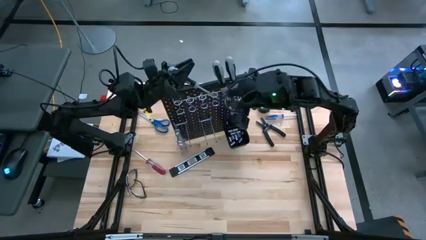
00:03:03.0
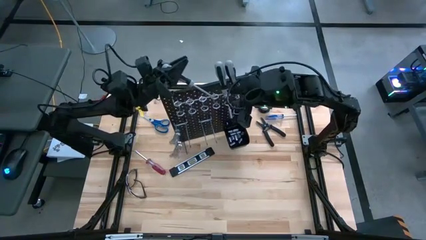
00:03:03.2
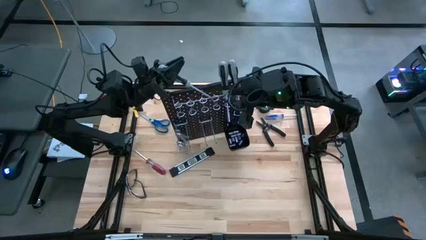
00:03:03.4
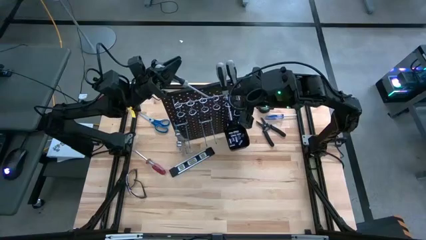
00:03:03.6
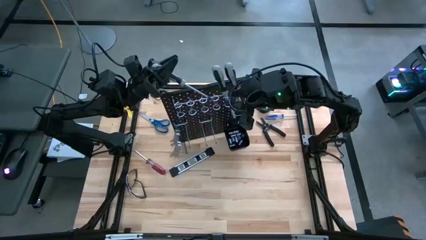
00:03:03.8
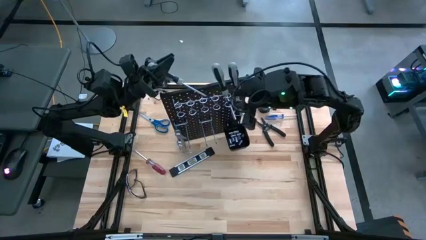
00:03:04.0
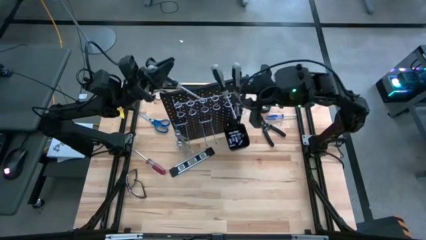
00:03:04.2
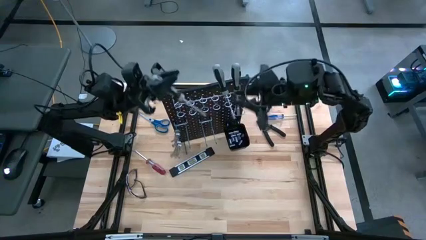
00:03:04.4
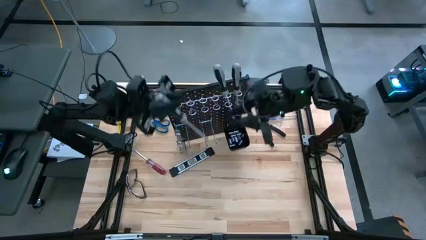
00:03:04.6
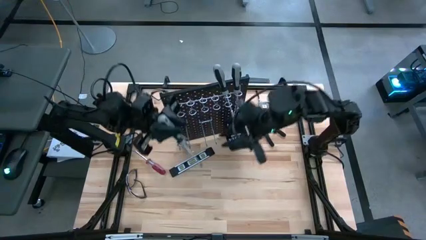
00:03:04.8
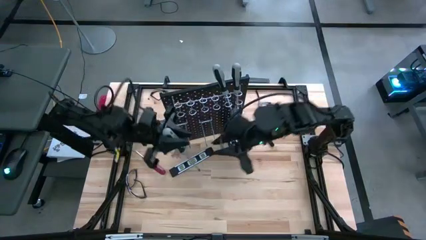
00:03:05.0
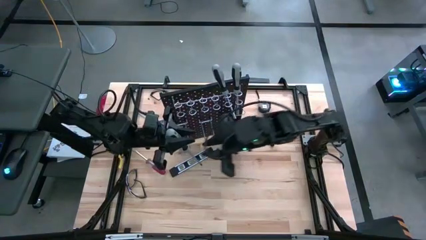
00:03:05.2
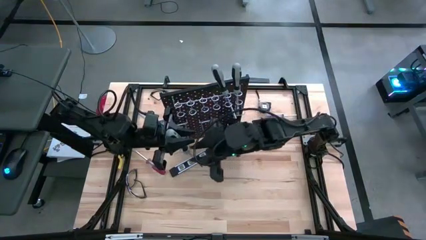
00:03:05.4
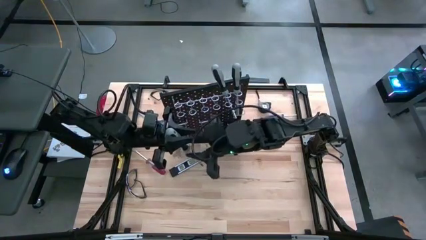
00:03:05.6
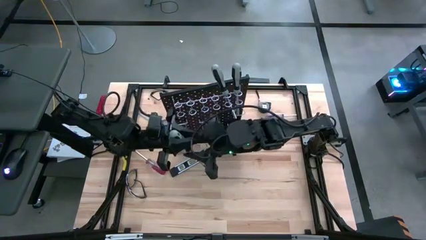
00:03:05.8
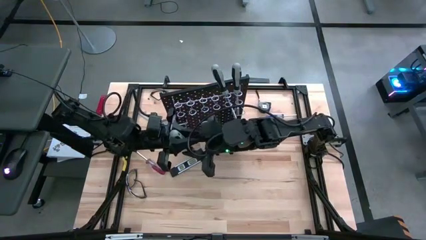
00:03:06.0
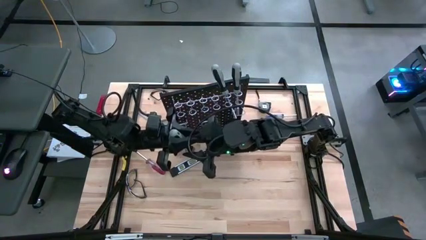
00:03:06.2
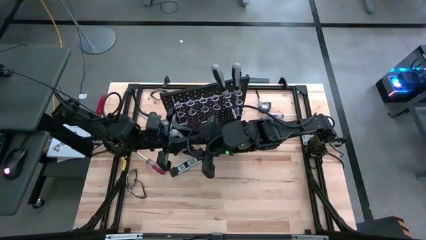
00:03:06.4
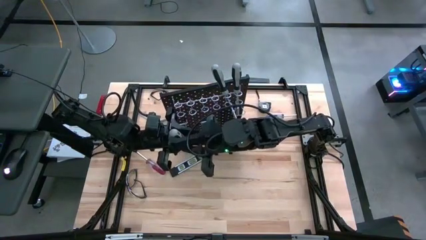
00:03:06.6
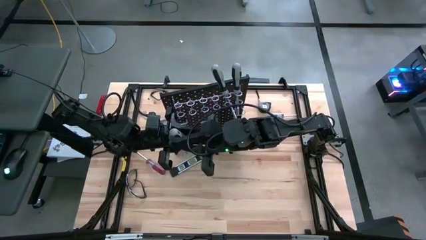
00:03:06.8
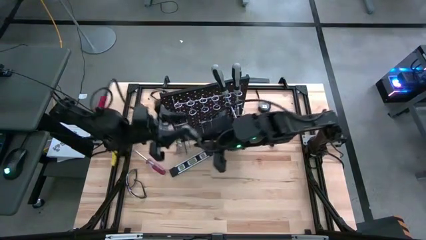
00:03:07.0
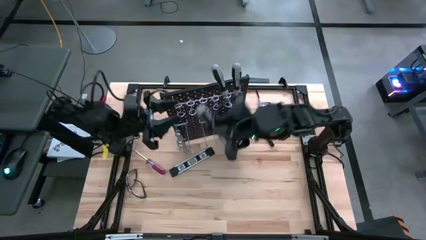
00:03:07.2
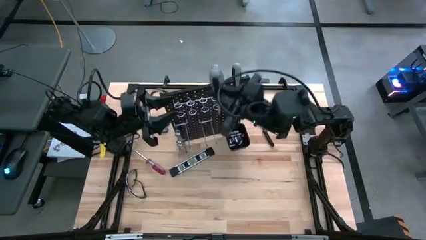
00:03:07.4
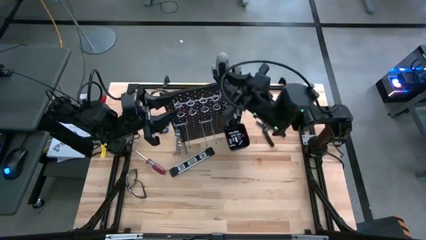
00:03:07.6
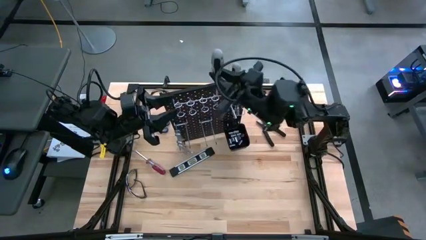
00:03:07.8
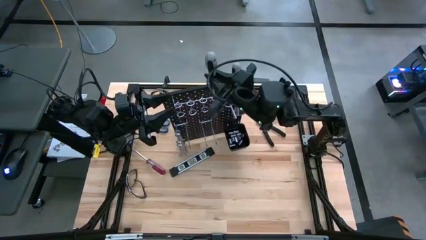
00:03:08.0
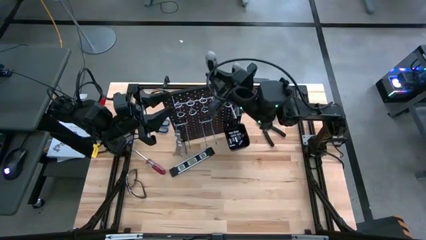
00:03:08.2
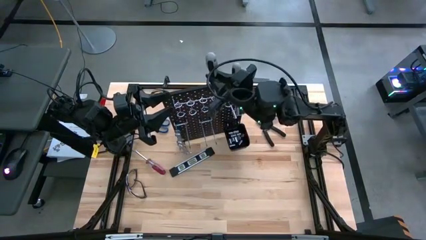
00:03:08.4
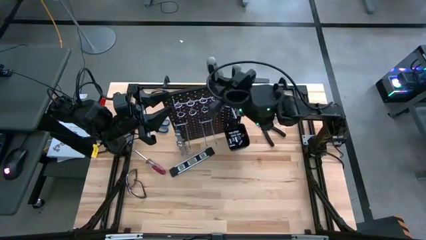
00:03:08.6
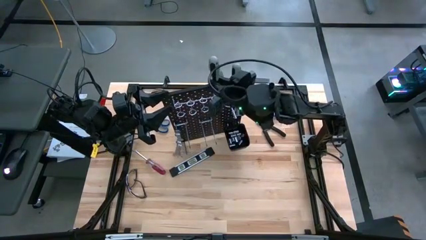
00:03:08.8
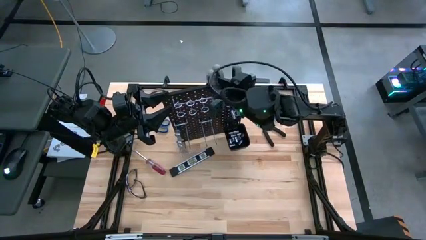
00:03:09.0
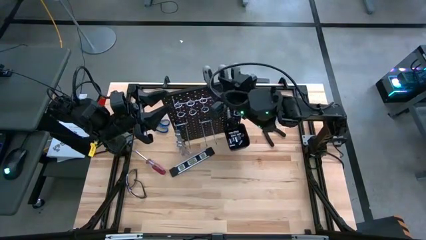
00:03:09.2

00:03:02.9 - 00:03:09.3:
Task: Hang tools onto peg board
Hang the gray screwdriver on the pegboard

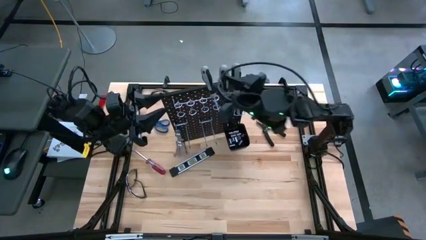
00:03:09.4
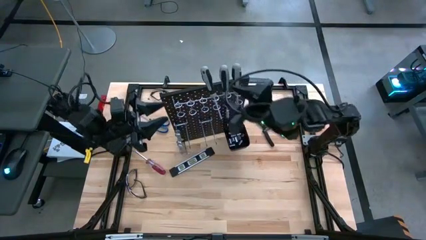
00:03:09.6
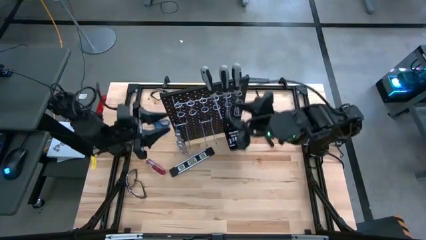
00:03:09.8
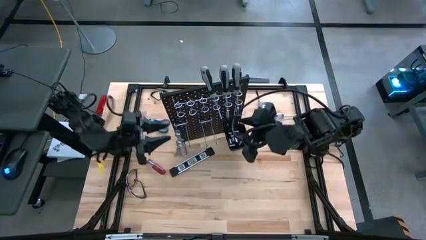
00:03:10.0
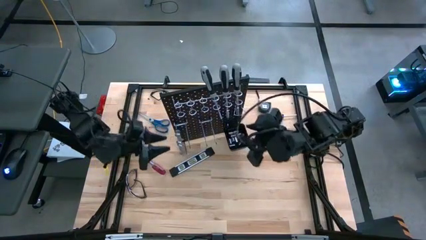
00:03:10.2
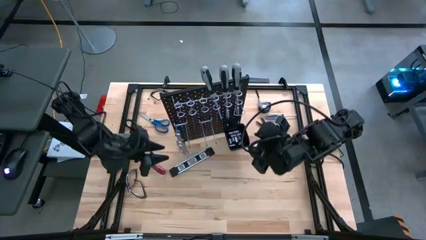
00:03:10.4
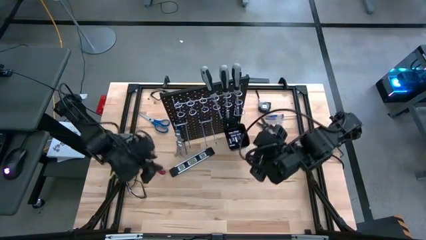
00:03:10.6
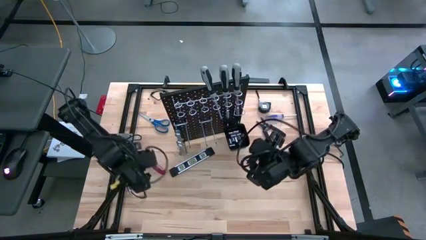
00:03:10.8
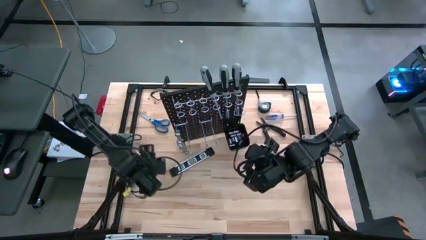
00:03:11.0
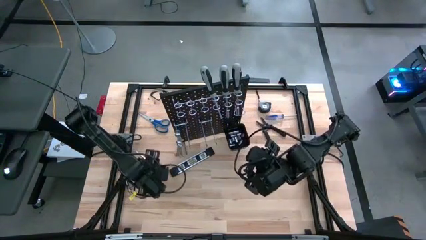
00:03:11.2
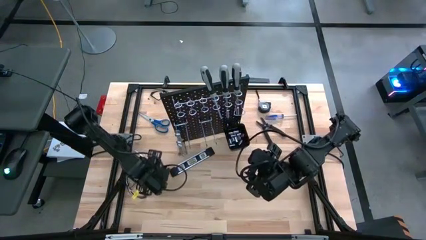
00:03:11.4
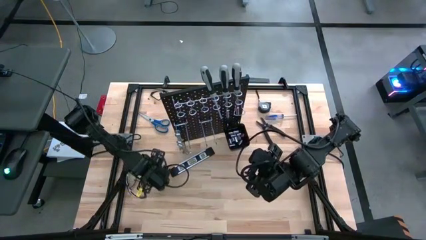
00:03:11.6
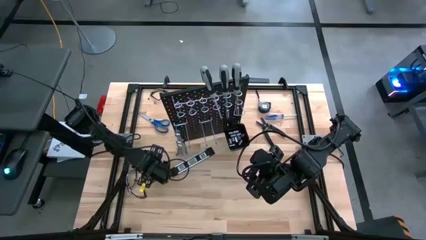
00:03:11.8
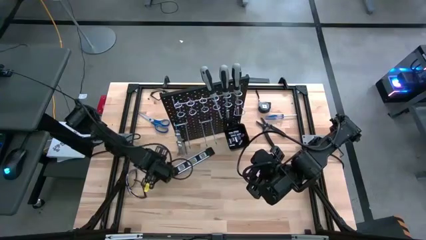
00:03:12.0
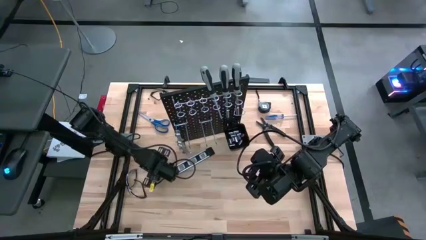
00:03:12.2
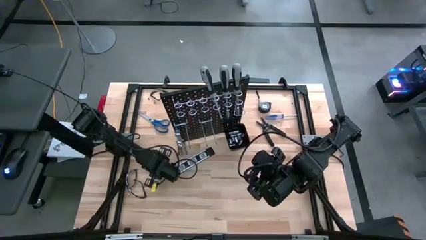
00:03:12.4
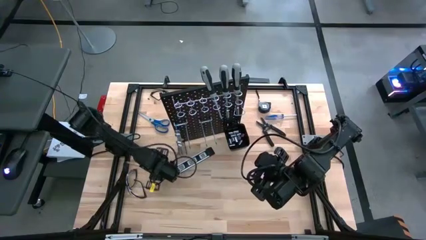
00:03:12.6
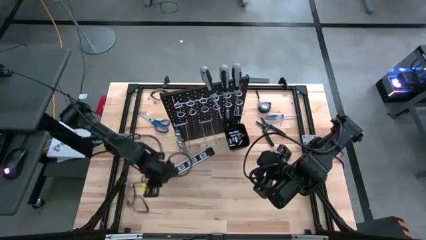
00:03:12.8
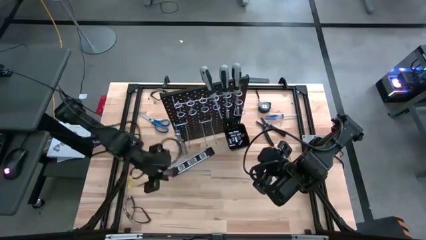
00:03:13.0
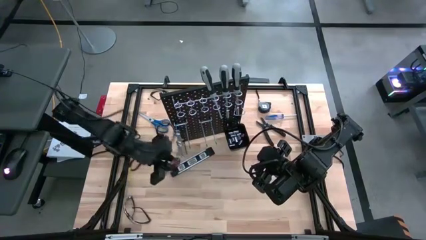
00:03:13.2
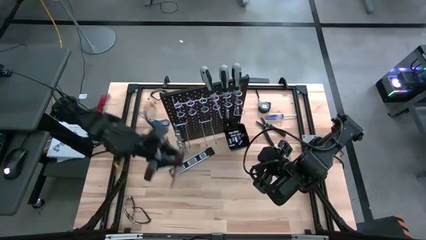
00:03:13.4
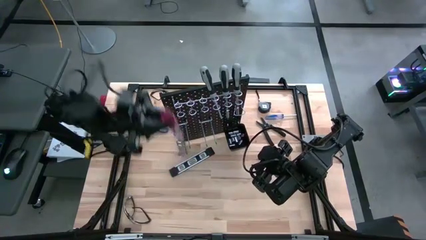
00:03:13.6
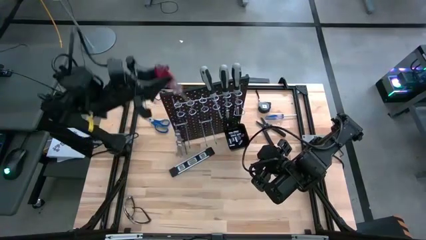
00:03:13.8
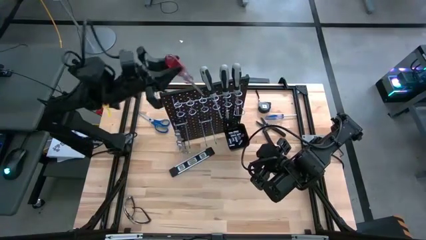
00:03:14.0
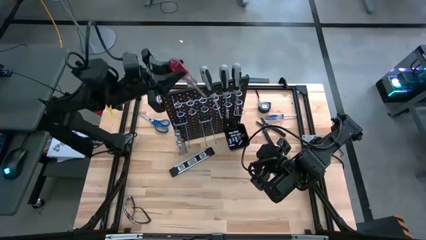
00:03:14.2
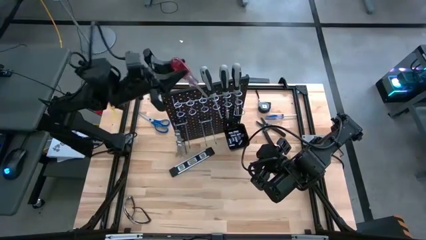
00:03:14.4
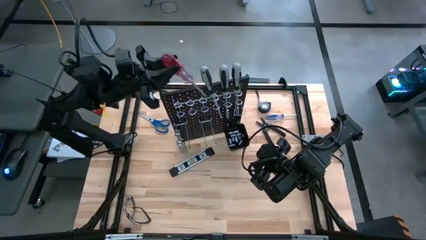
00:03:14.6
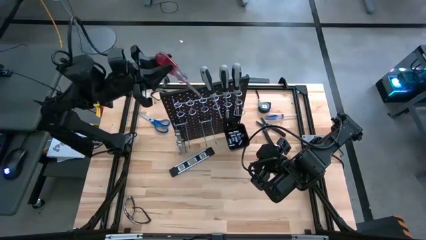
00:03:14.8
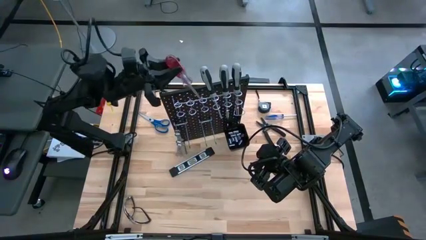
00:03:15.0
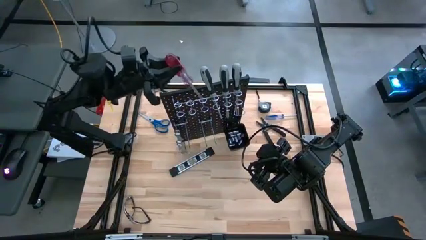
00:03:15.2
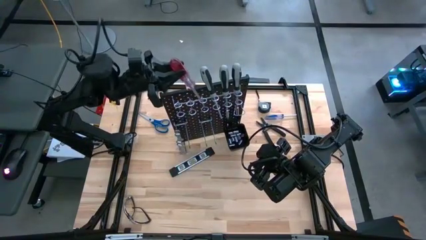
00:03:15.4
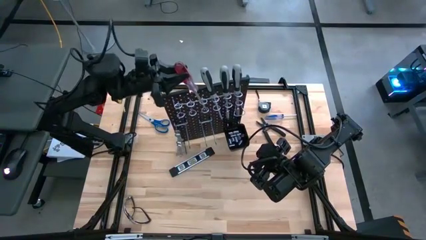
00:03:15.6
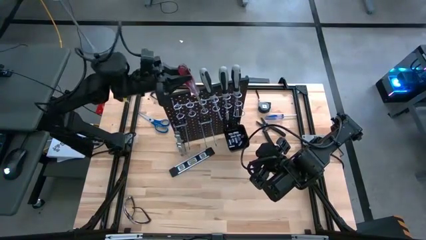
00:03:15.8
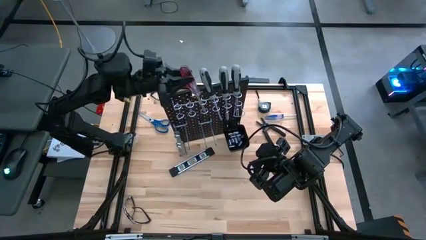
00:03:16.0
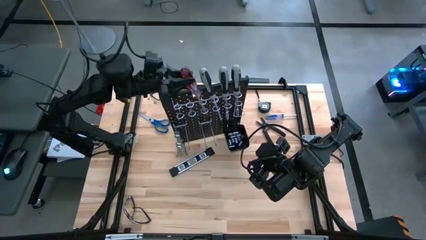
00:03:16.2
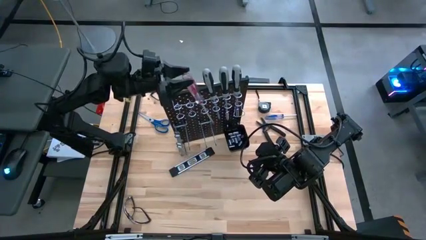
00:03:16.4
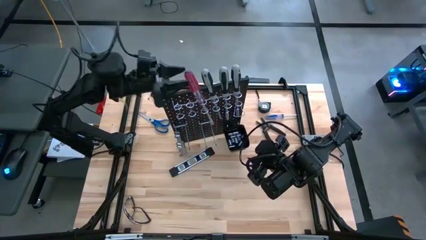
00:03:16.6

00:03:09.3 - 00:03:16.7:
Hang the red transparent screwdriver on the pegboard

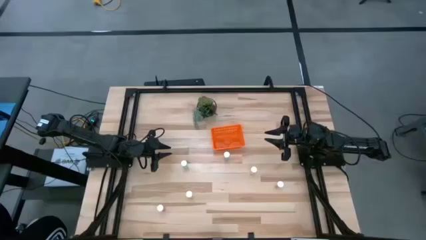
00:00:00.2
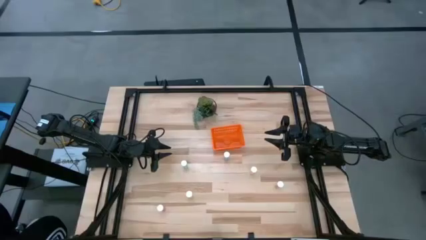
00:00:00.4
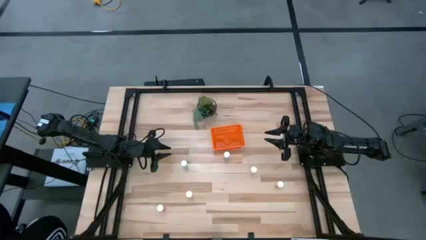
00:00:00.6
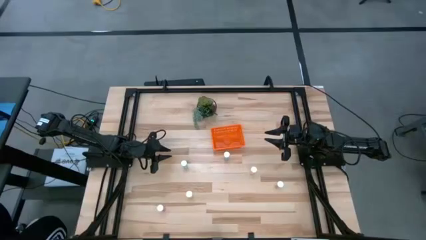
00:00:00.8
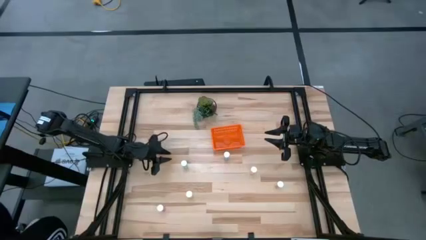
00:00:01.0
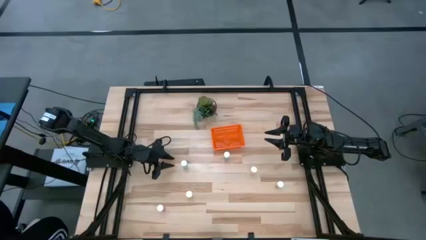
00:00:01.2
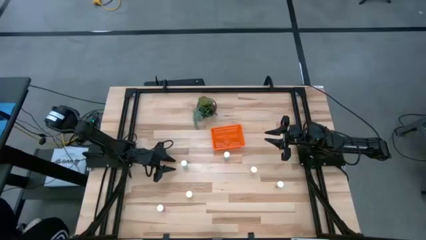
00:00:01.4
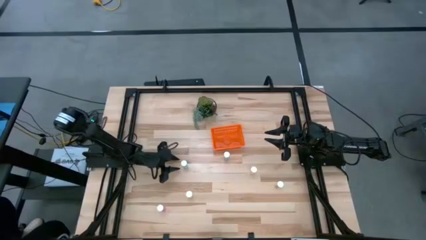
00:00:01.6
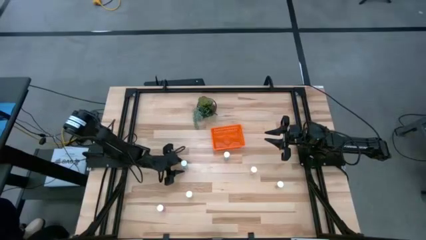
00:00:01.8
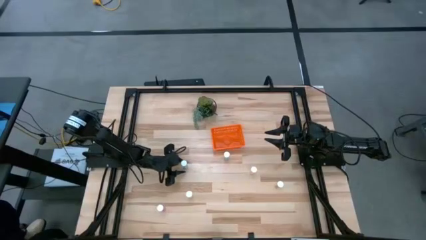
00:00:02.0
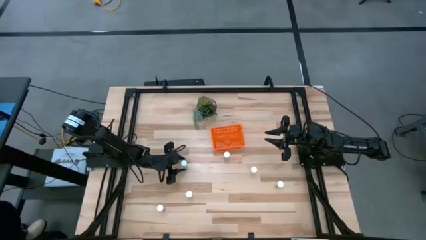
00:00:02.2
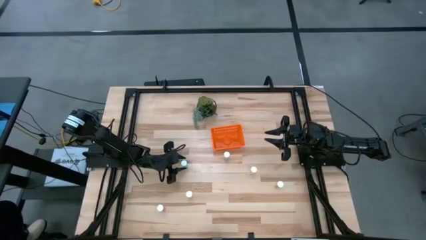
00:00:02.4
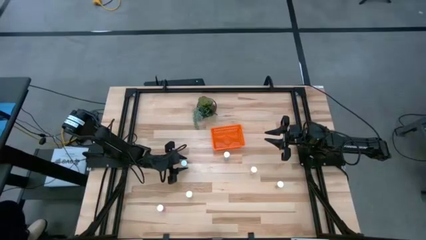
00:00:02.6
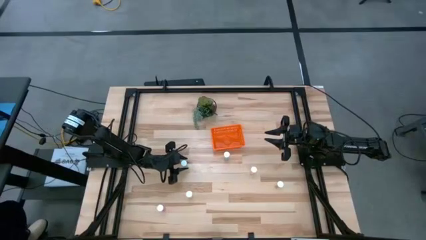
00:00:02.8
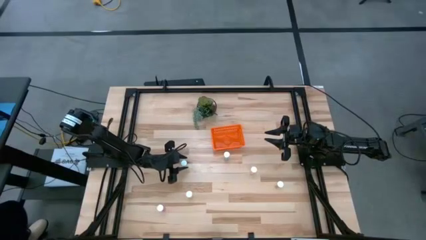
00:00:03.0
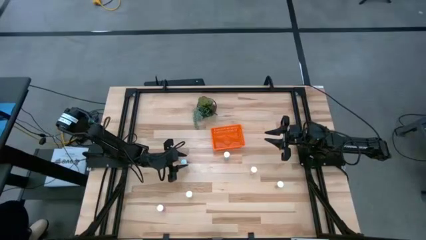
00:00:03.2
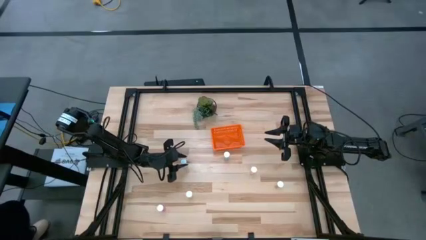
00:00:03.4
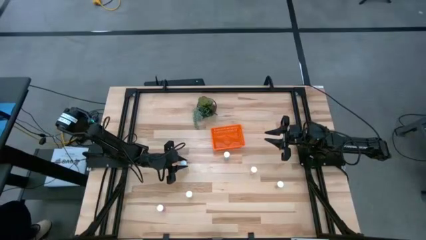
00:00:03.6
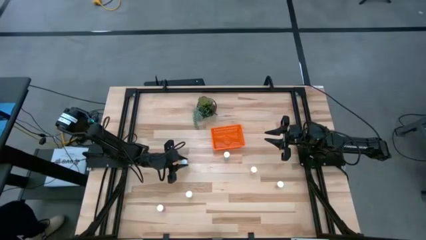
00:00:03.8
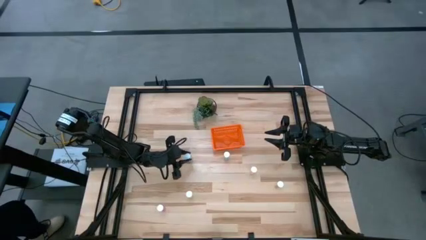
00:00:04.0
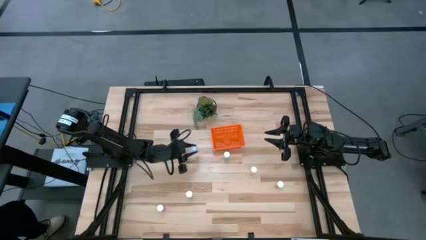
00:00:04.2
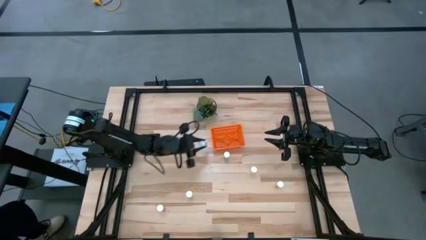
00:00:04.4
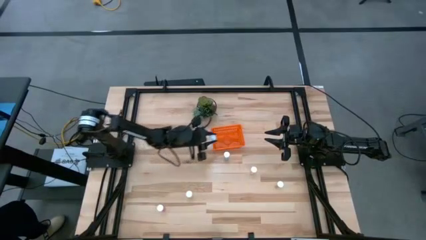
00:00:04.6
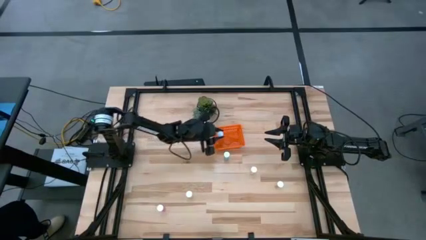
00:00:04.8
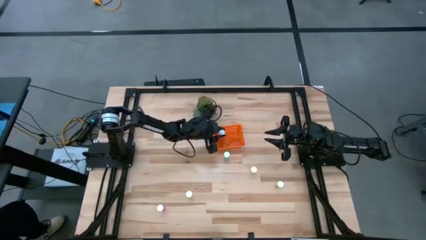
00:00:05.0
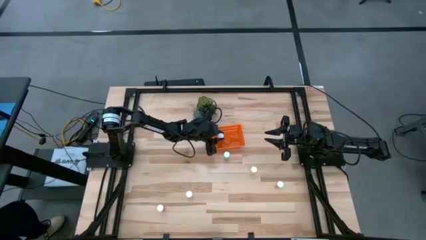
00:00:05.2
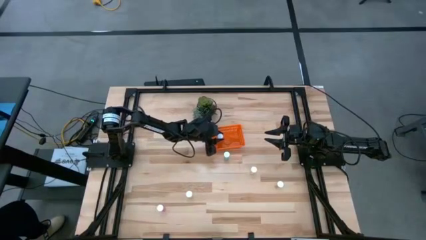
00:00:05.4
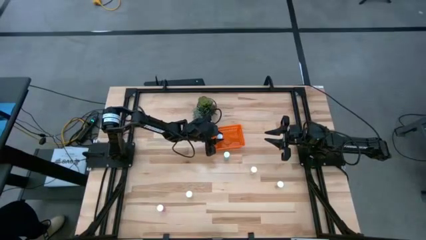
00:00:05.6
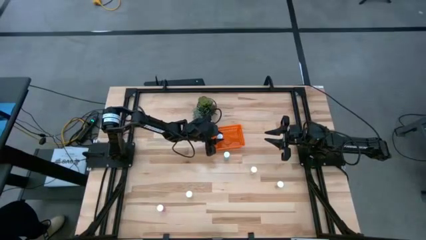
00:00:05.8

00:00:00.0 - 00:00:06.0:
Task: Pick and place pill bottles into a basket
Put the blue pill bottle into the orange basket
